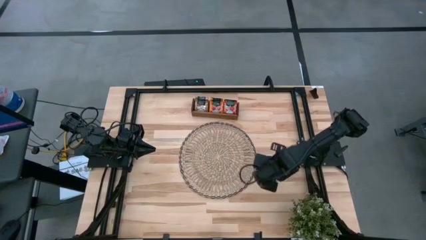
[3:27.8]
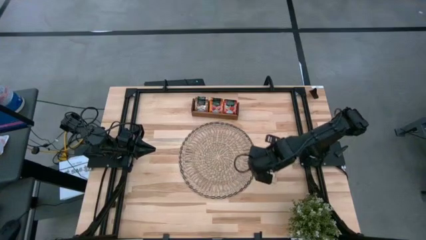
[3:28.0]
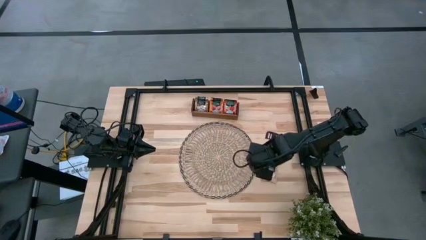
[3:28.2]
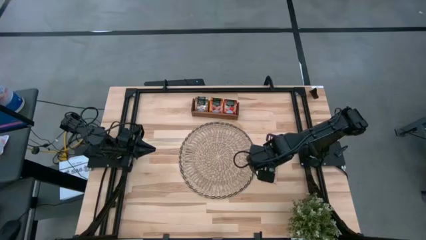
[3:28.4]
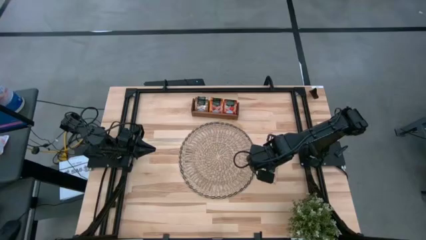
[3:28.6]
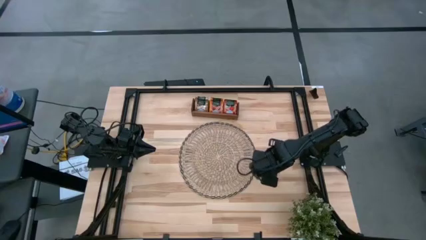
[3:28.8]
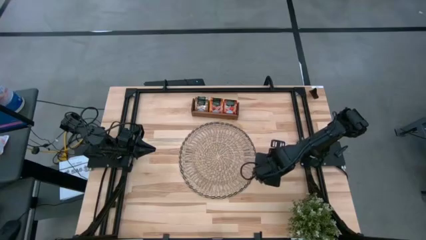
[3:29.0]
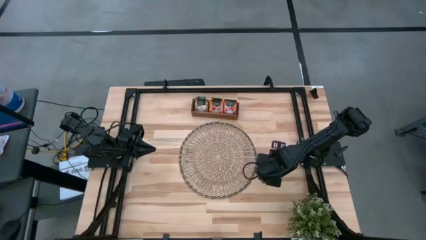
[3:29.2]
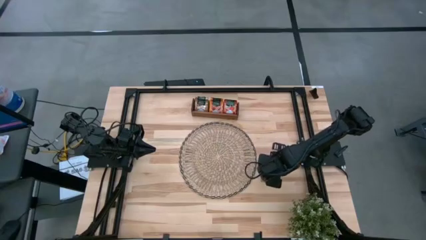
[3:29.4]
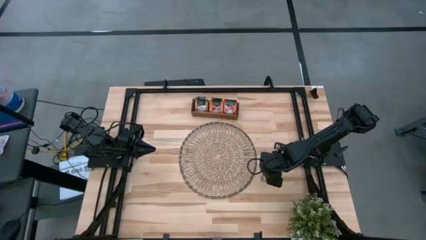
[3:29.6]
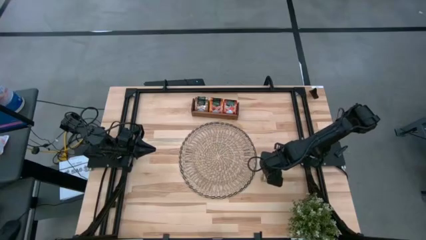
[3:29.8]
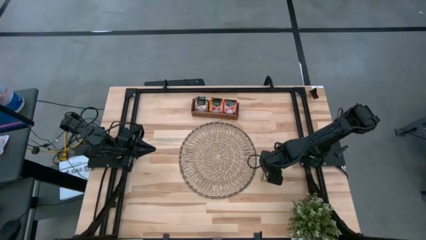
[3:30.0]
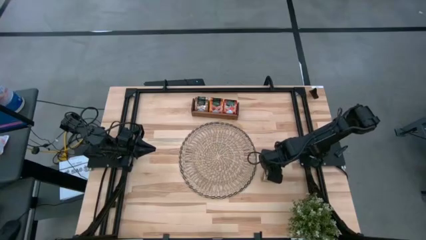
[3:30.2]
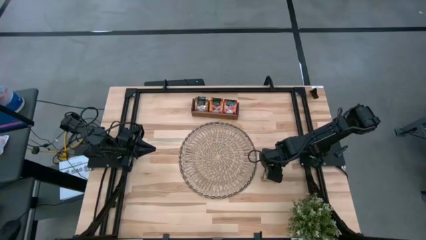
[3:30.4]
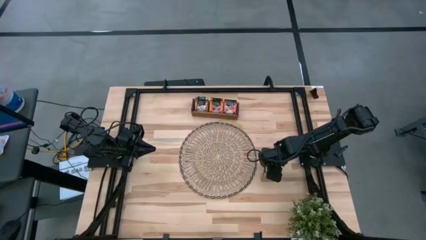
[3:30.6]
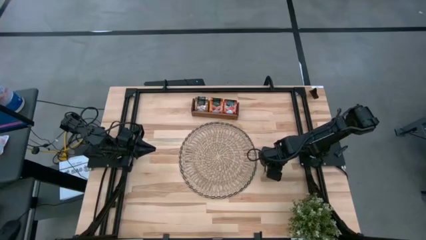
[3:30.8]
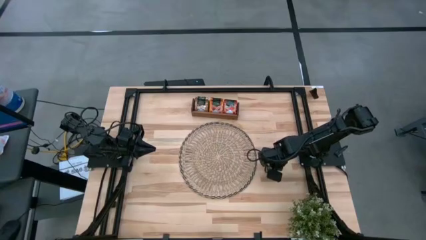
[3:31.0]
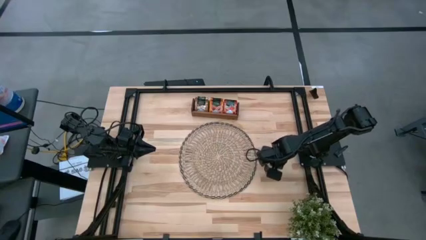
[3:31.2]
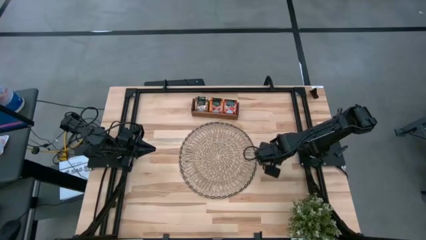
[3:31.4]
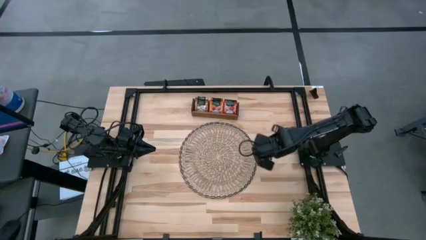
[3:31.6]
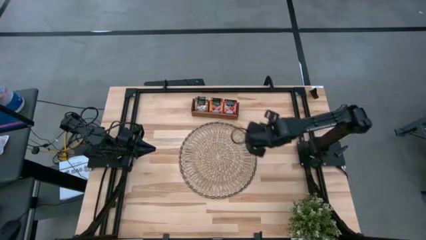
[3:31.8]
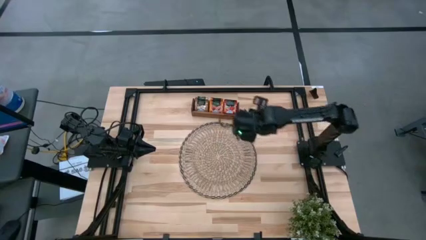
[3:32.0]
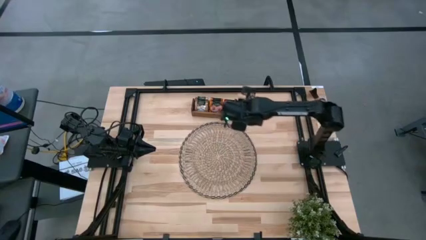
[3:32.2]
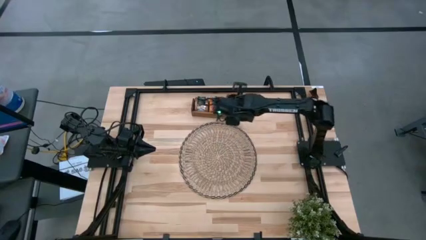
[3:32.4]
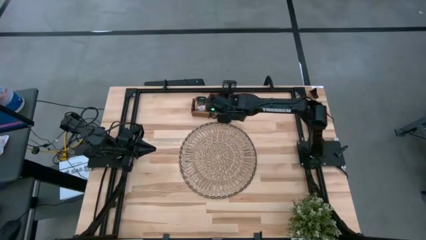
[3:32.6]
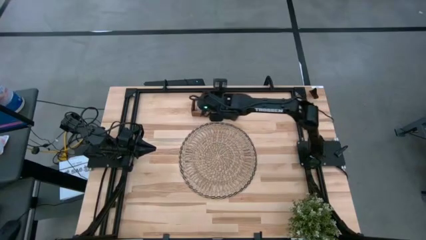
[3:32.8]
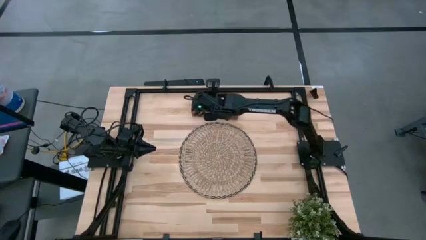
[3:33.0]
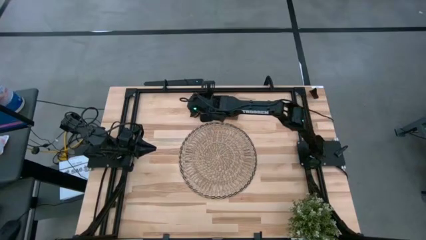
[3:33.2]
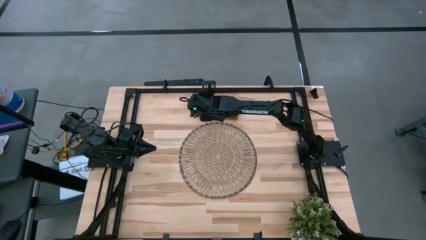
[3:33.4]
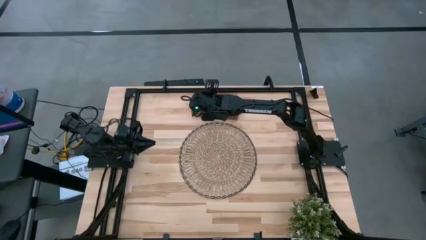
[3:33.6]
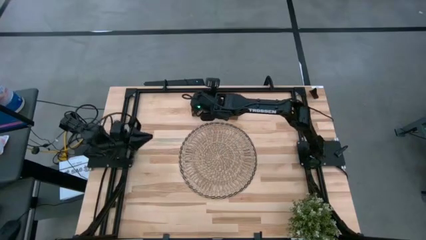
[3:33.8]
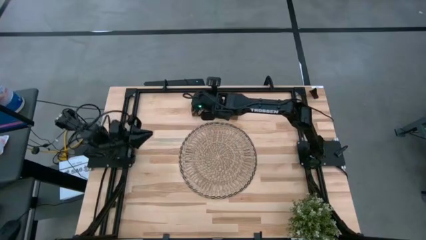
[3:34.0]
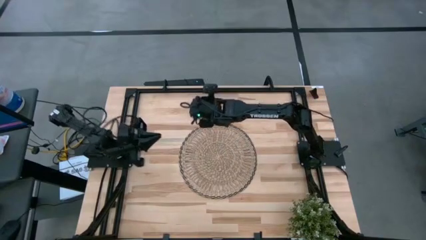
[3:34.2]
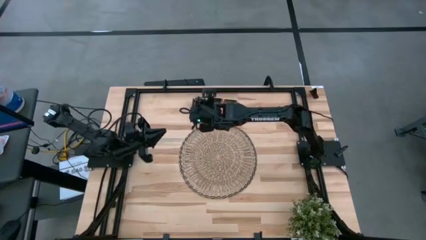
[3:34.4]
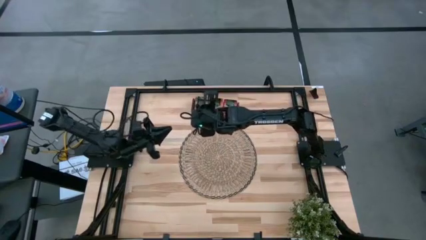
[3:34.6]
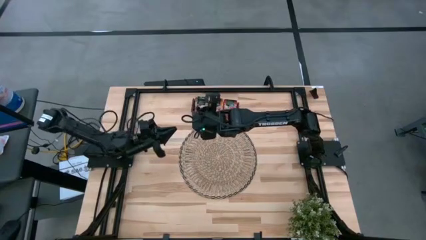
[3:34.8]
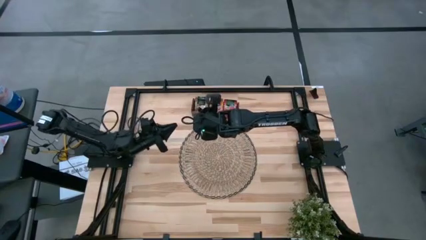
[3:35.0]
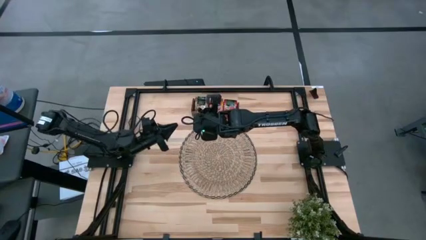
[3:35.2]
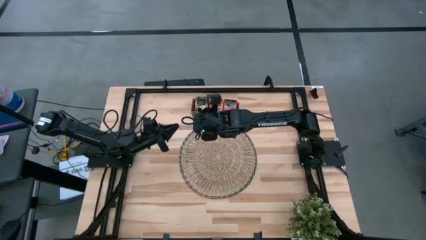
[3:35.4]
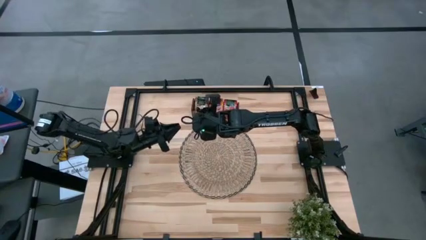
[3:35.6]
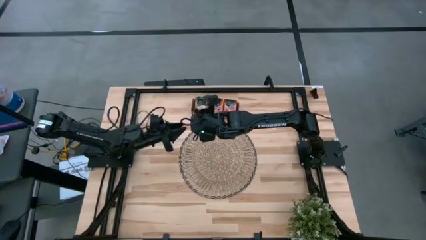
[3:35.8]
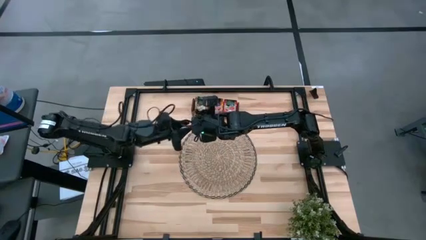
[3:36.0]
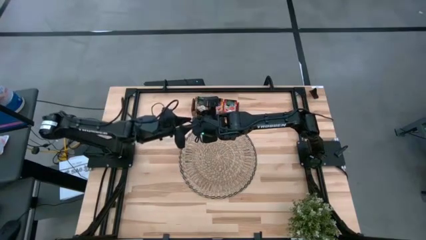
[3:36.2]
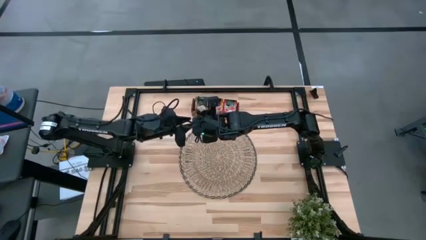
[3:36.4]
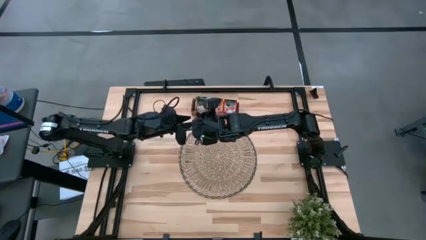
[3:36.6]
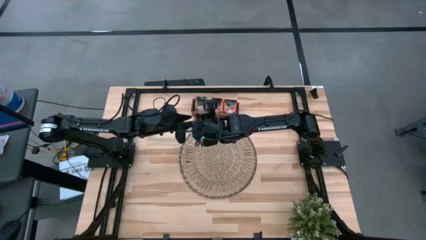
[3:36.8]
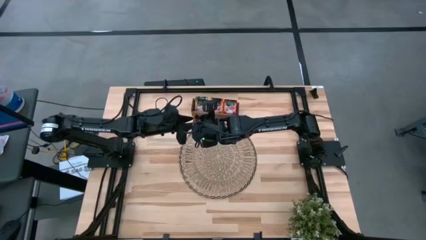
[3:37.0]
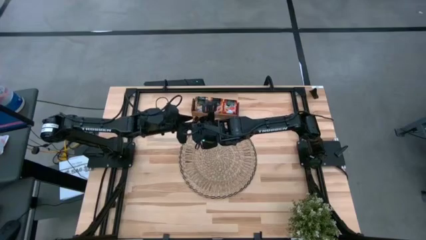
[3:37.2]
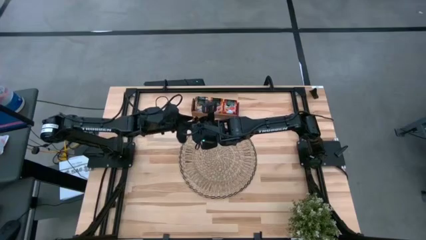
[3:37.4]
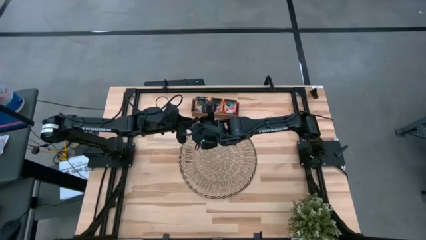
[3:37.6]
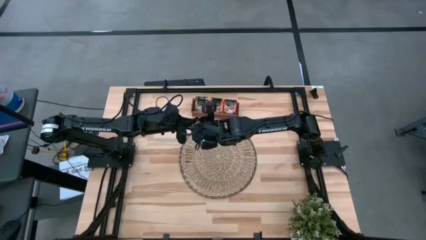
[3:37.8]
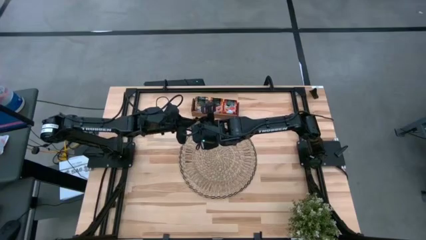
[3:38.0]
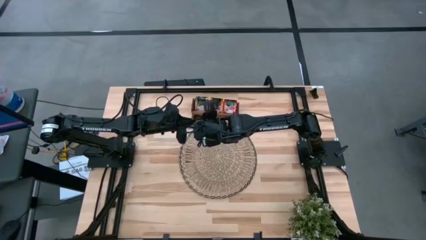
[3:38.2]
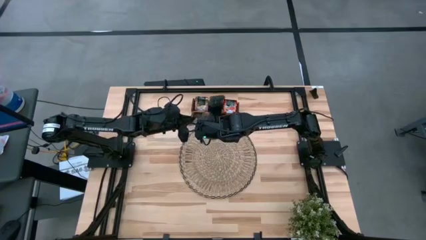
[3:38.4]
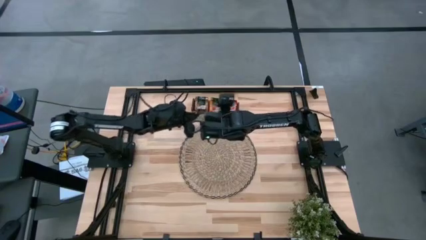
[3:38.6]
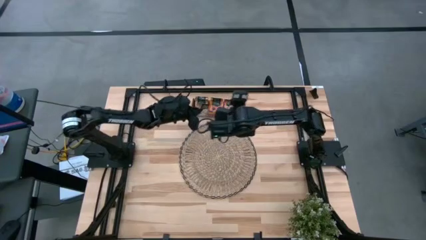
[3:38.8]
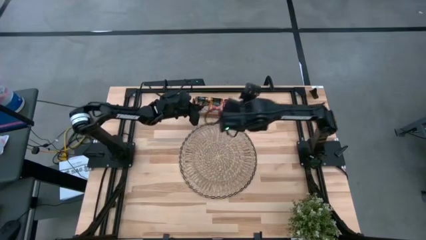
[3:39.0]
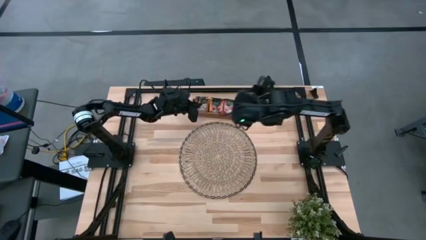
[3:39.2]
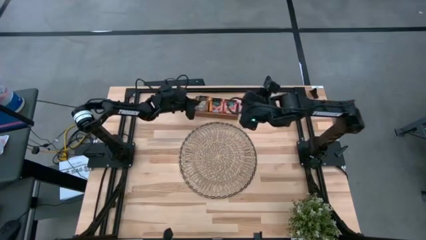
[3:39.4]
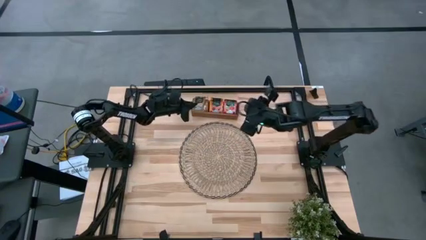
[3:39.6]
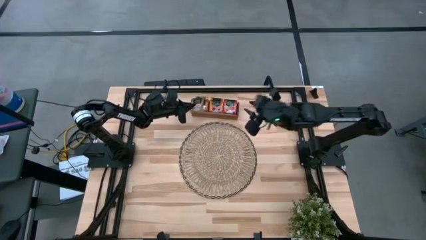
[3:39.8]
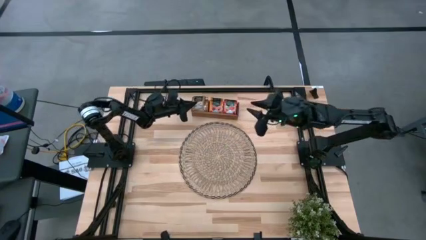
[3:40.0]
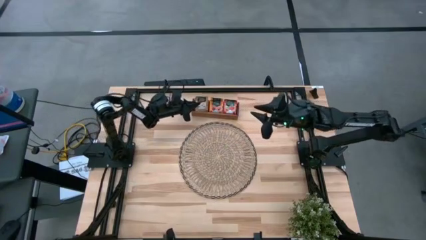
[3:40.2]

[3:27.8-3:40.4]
Task: Pick & Place Tea
Put the brown tea bag into the left section of the wooden organizer
